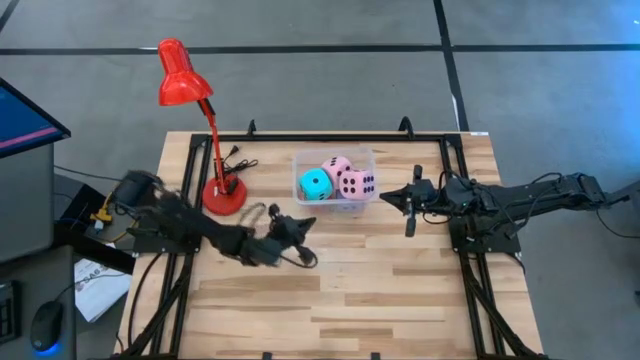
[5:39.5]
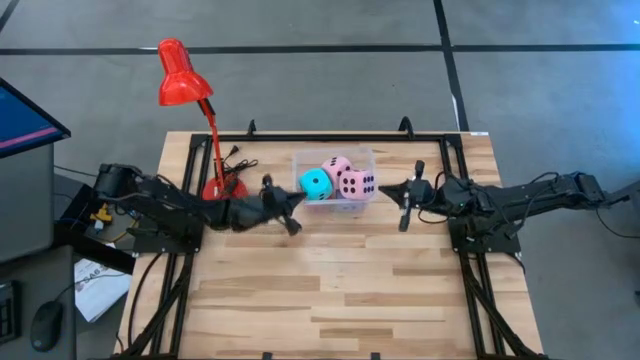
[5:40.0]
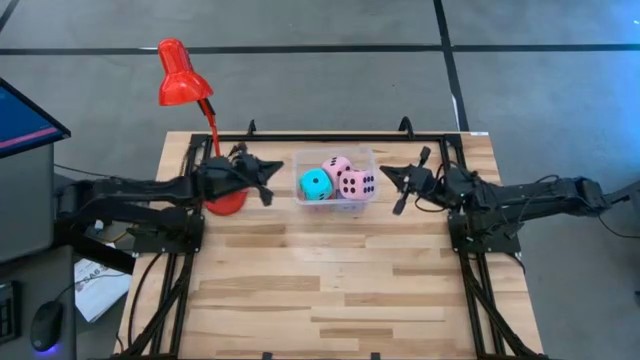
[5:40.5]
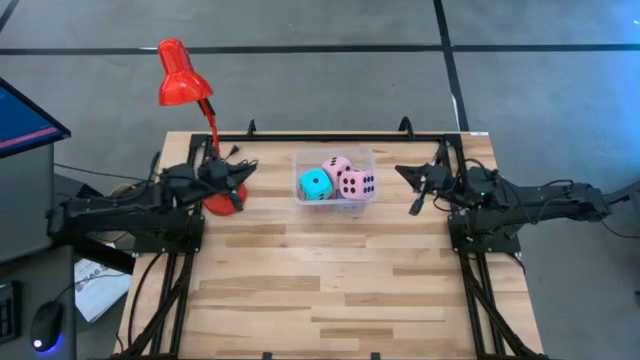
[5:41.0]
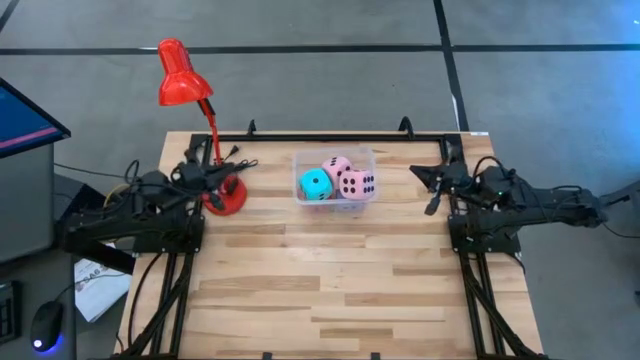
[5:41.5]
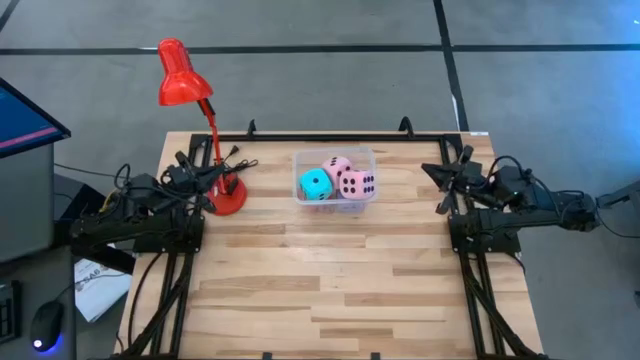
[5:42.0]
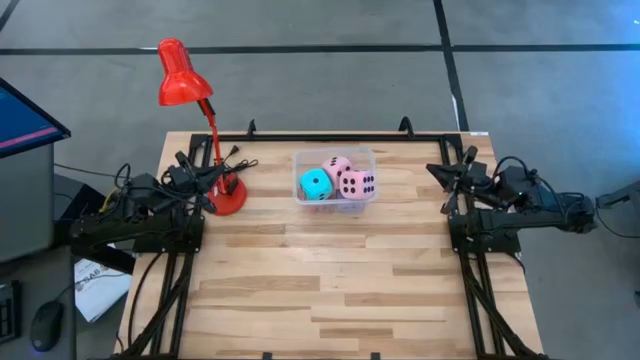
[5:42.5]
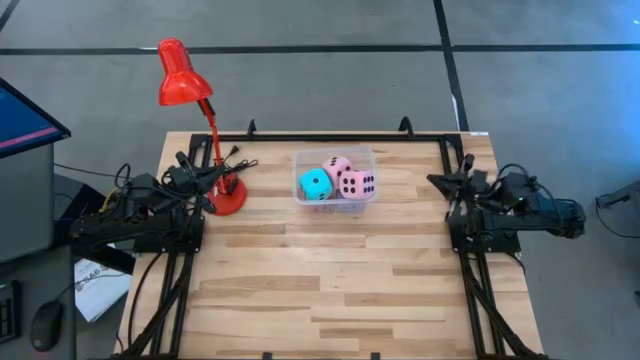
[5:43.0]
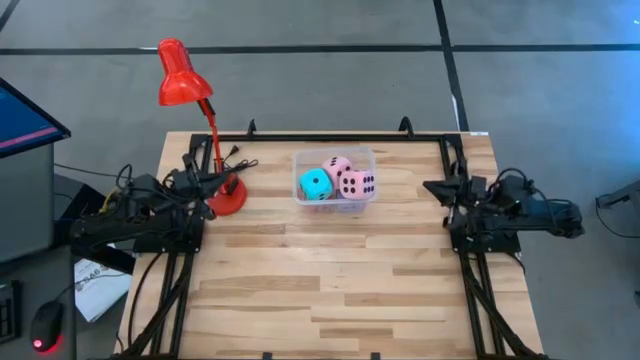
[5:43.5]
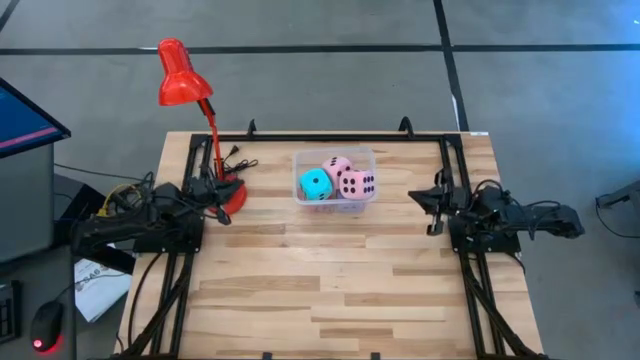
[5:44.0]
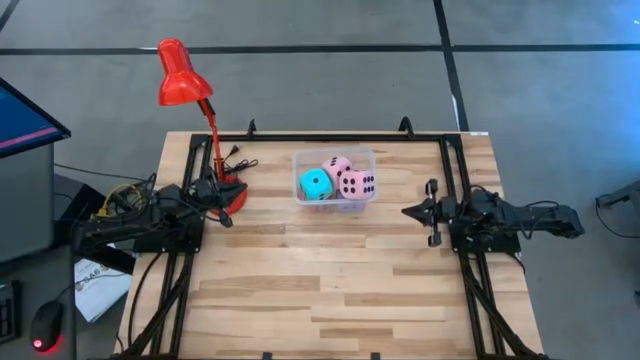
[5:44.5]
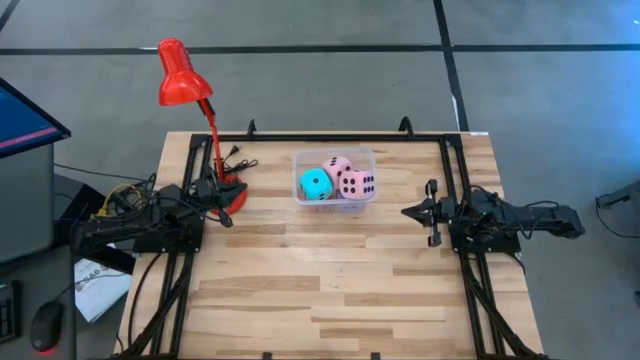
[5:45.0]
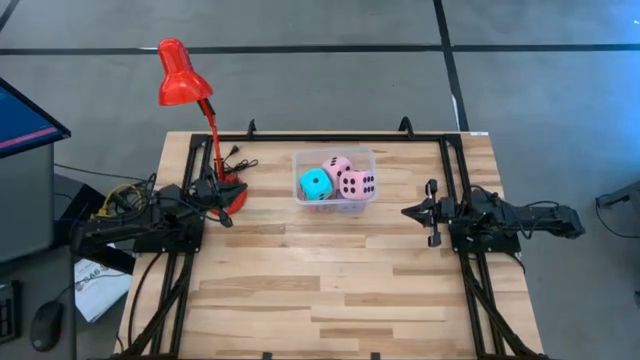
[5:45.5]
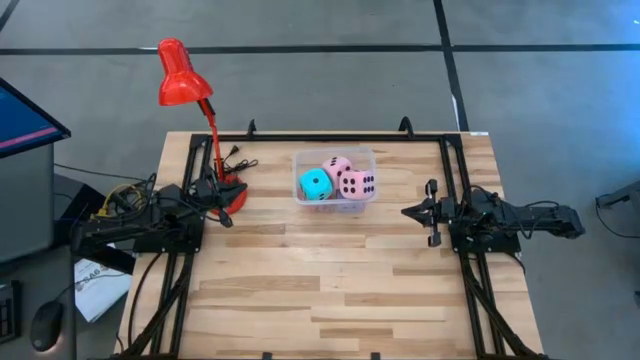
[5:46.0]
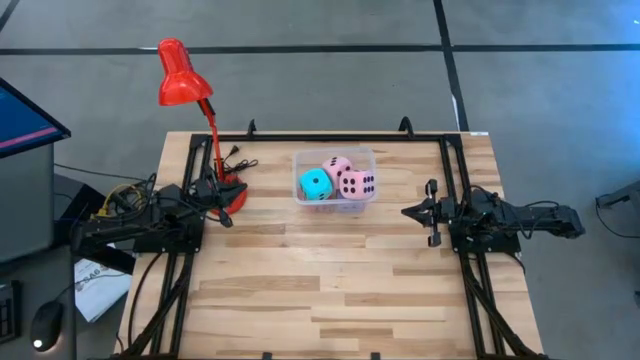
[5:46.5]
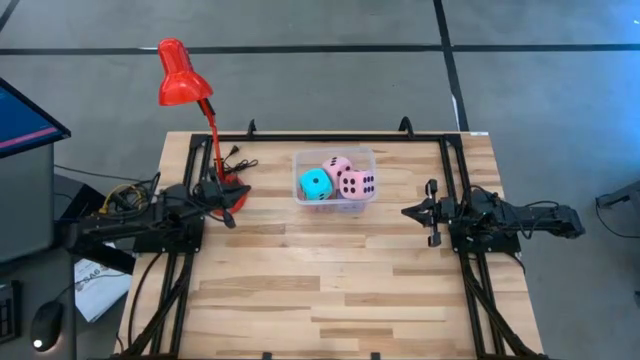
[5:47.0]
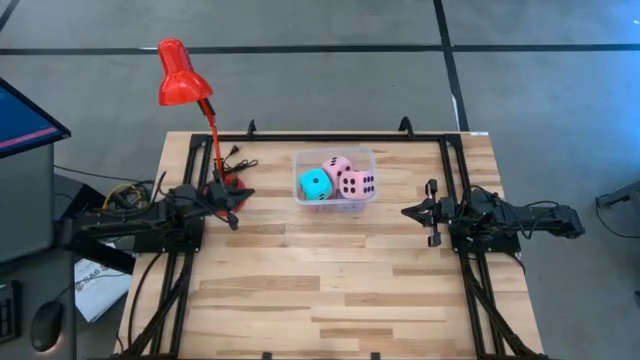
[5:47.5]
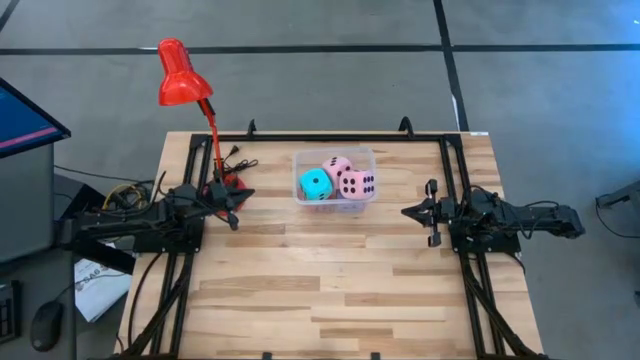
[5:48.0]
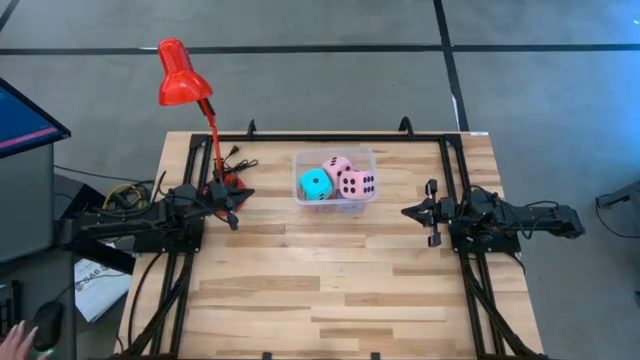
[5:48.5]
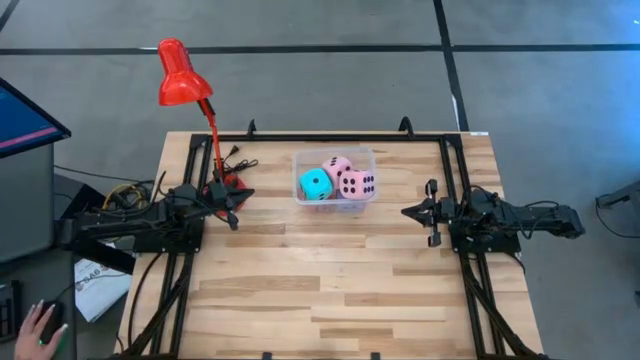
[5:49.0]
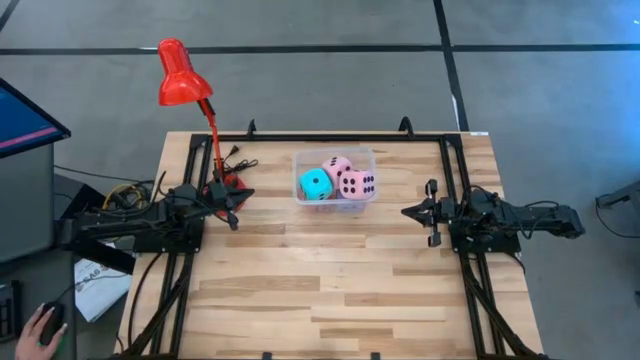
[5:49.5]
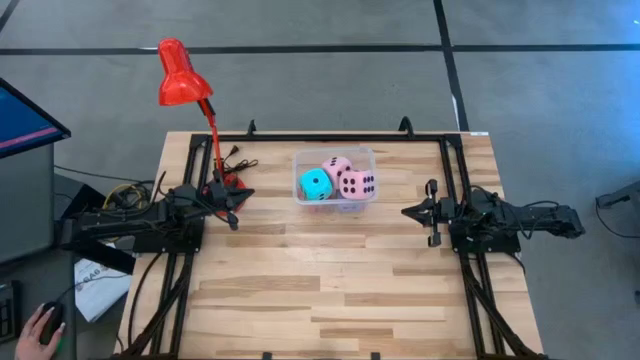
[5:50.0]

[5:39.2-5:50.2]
Task: Pick & Place Dice
Return to Home Position

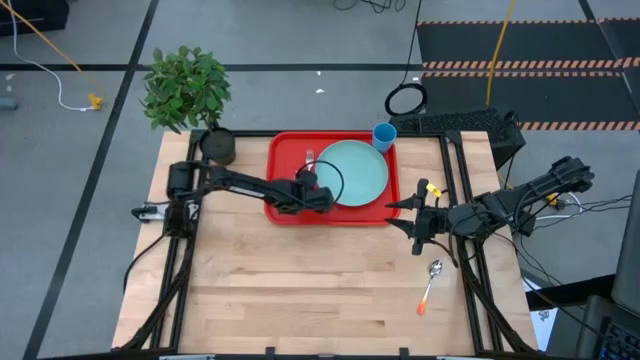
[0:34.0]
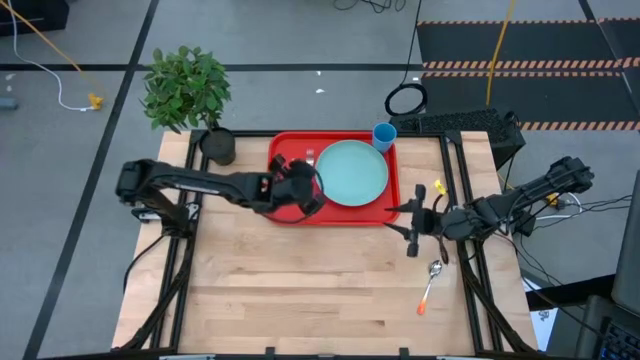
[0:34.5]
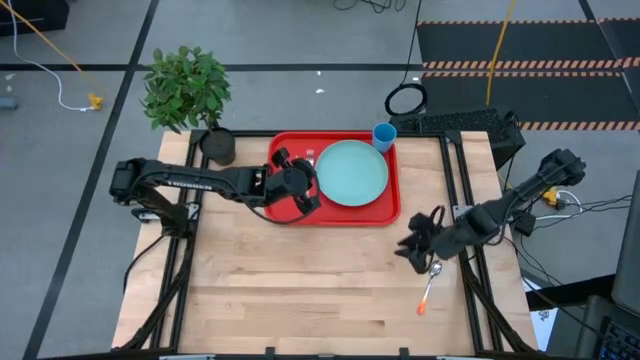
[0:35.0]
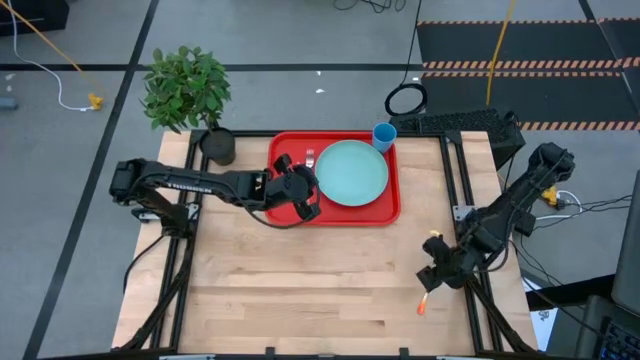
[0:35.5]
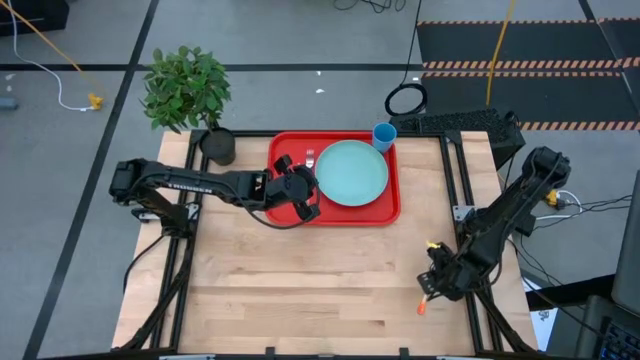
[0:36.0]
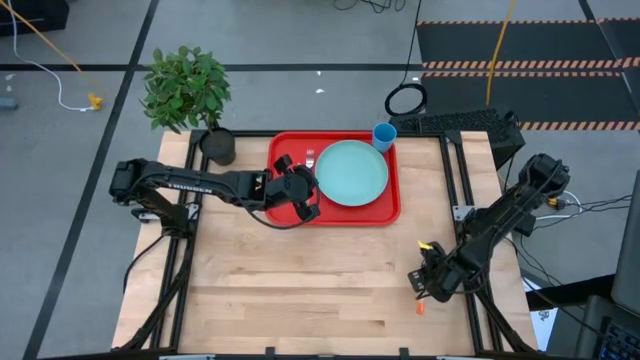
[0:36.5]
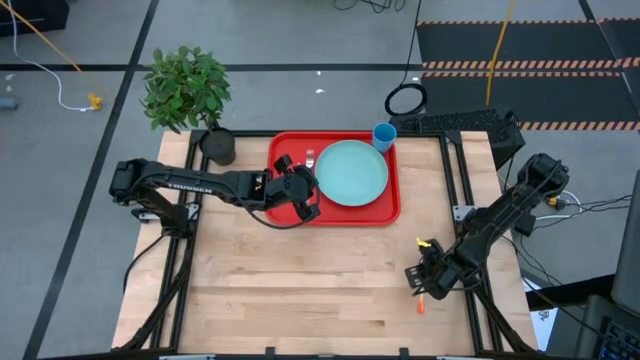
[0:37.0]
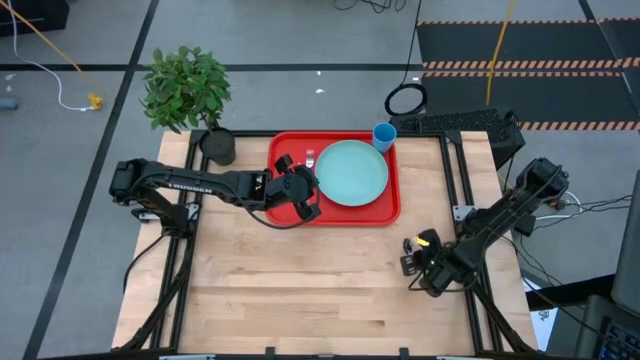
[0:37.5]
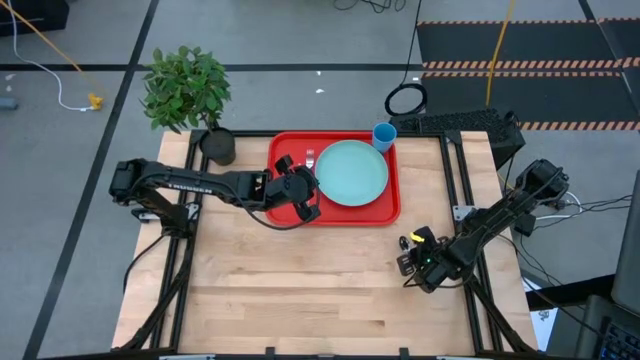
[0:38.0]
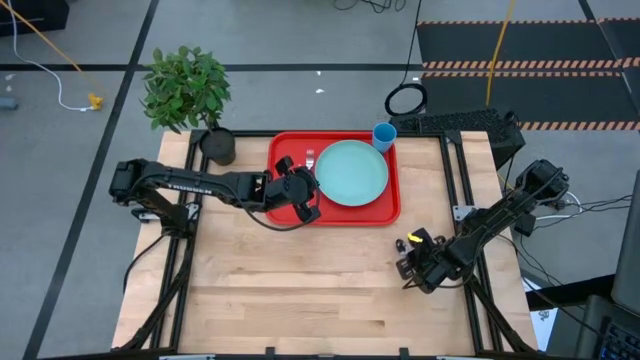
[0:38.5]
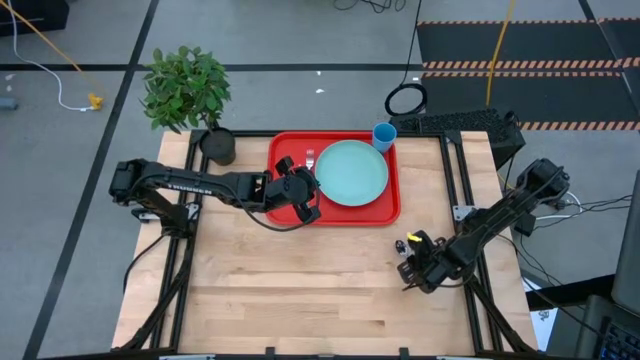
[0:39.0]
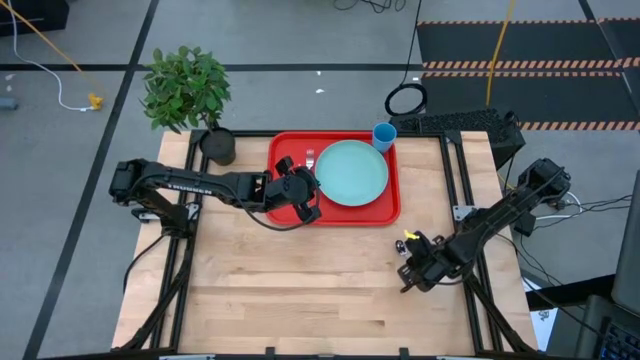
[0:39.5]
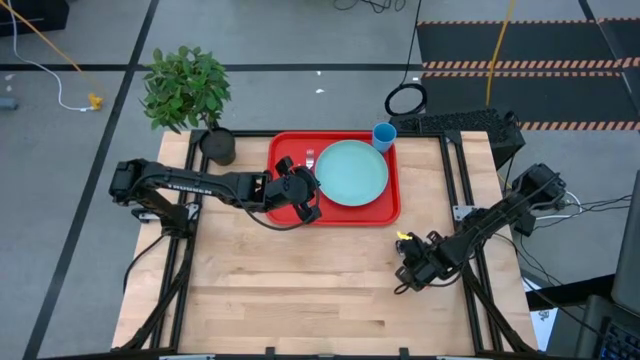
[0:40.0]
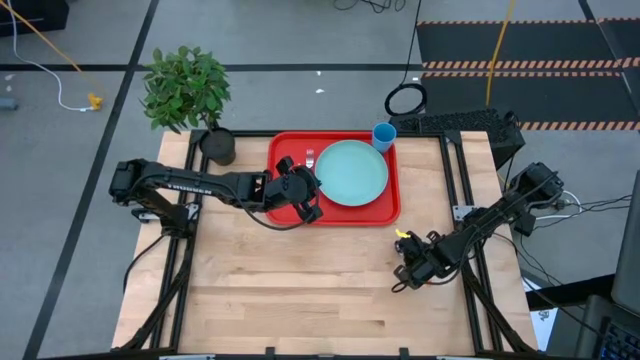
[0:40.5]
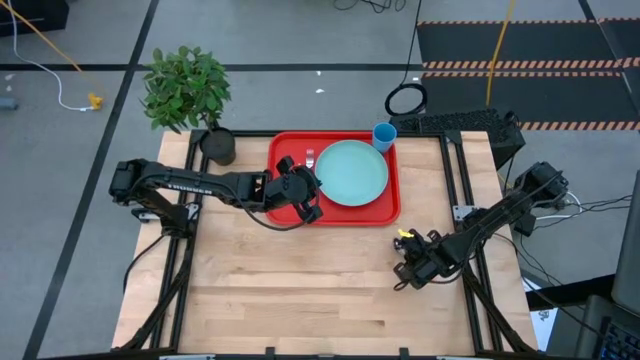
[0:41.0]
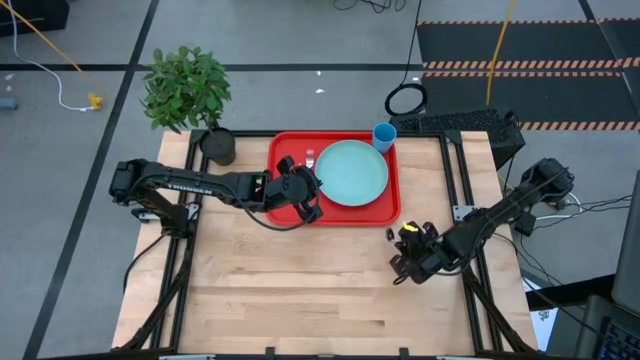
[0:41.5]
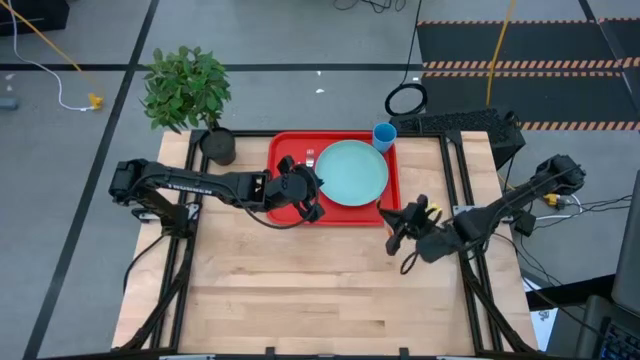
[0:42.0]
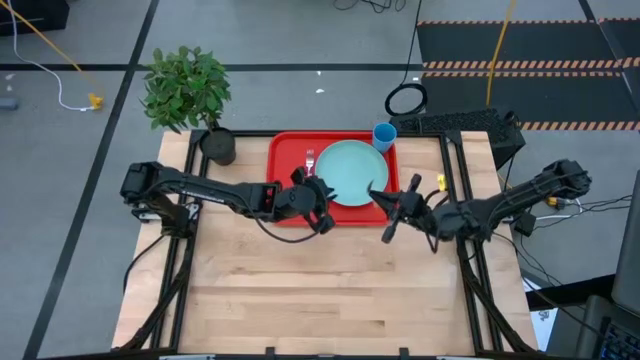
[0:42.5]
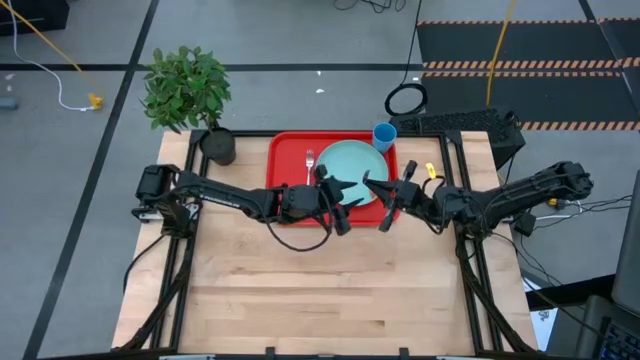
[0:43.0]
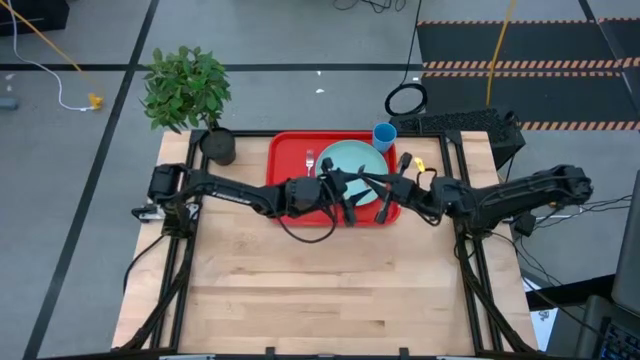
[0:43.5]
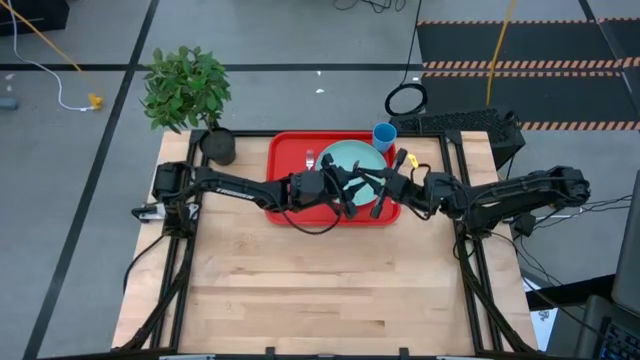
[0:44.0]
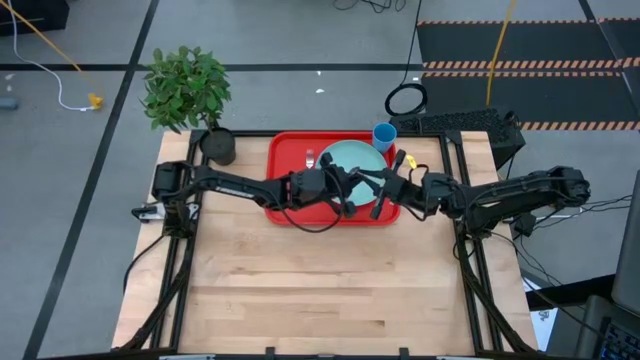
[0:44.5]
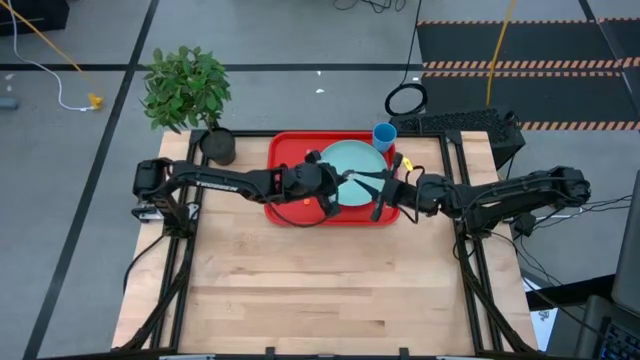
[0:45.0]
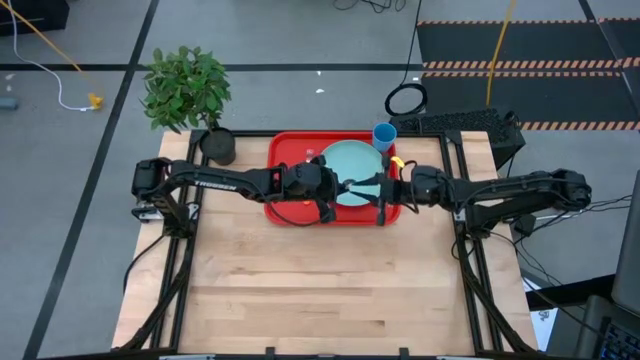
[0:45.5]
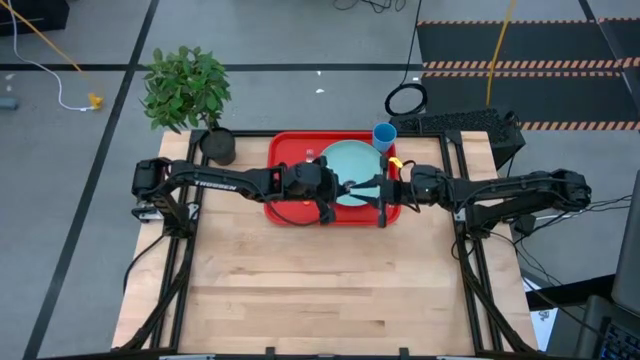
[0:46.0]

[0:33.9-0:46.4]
Task: Pick and place plate/cup/fork/spoon on tray
Put the orange spoon on the orange serving tray to the left of the orange fork
